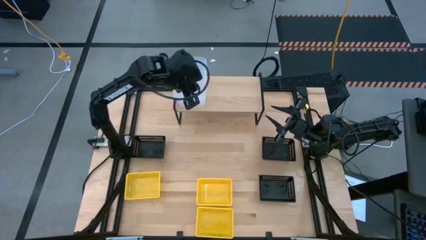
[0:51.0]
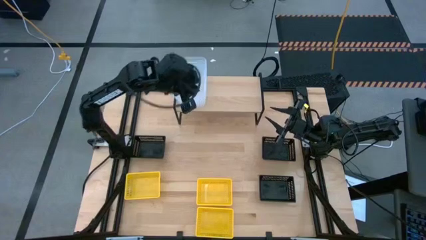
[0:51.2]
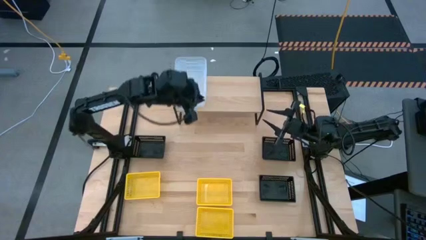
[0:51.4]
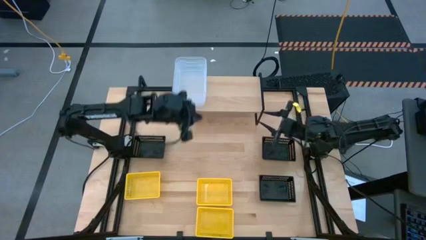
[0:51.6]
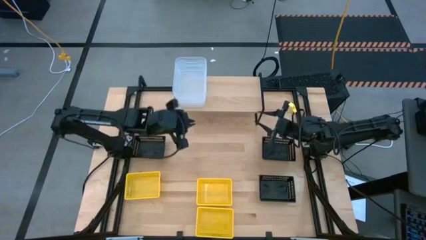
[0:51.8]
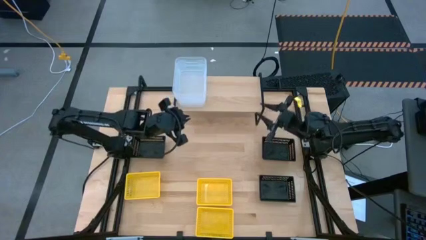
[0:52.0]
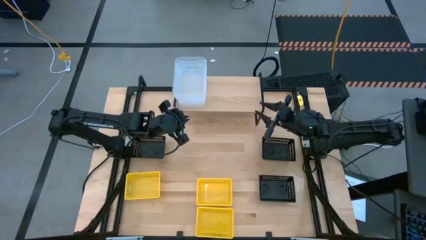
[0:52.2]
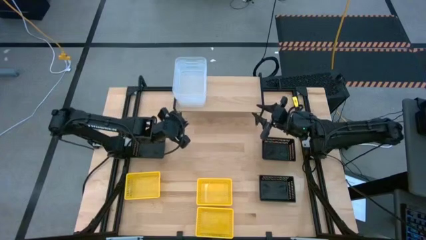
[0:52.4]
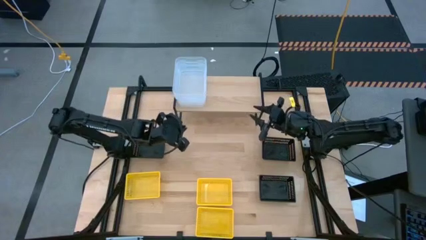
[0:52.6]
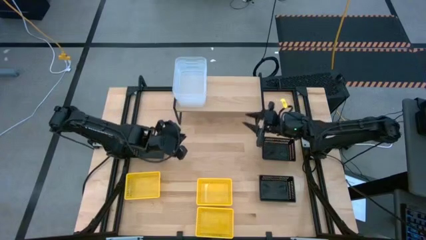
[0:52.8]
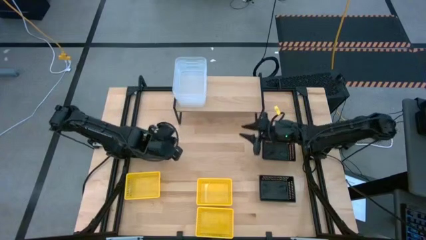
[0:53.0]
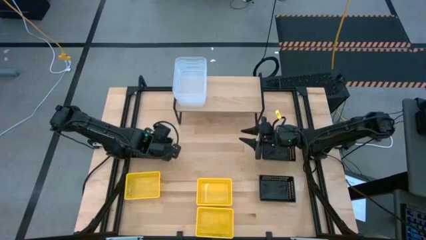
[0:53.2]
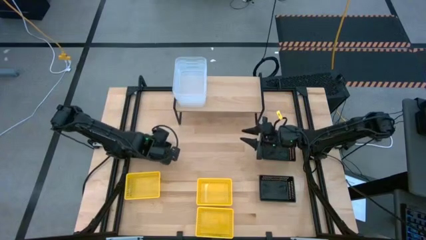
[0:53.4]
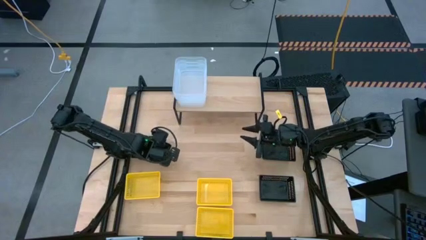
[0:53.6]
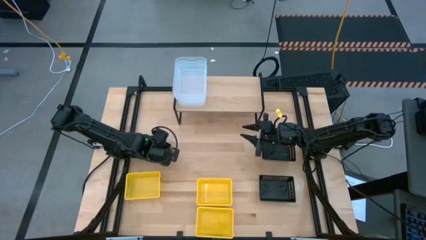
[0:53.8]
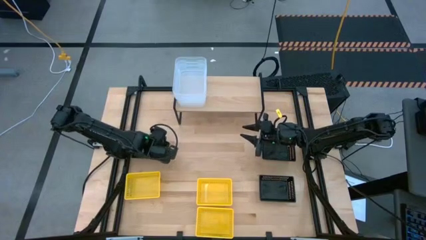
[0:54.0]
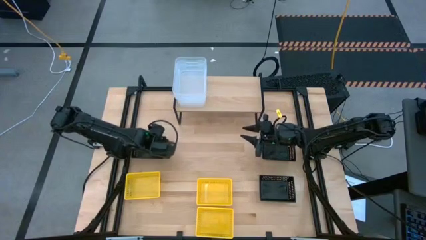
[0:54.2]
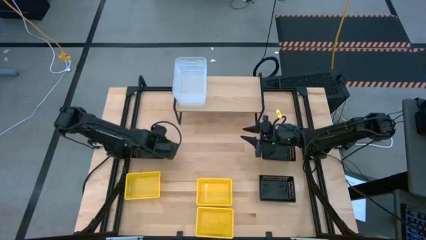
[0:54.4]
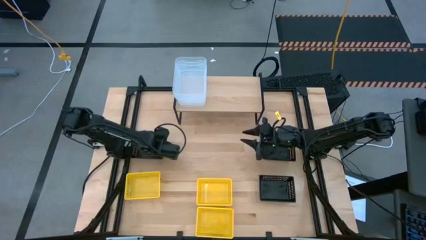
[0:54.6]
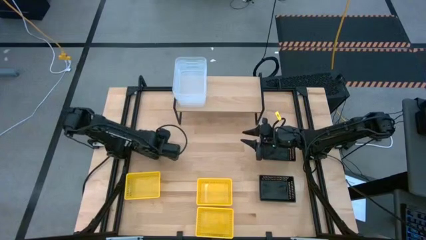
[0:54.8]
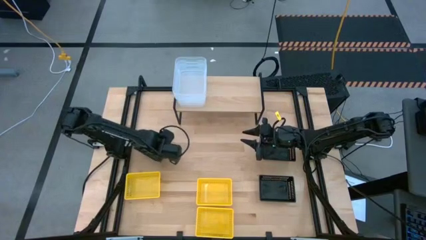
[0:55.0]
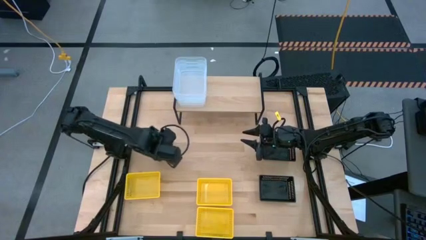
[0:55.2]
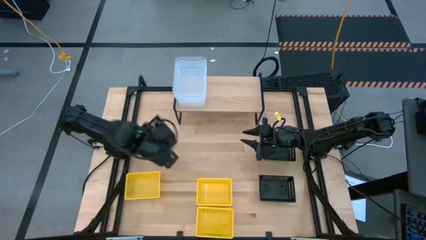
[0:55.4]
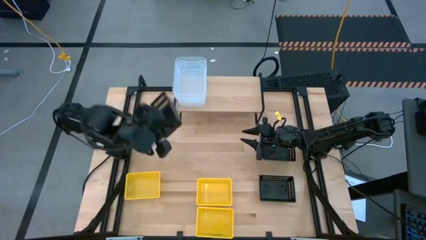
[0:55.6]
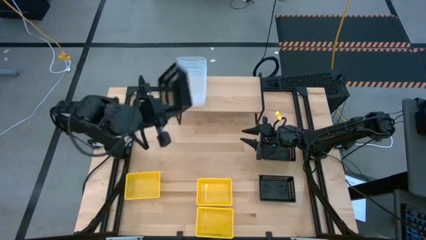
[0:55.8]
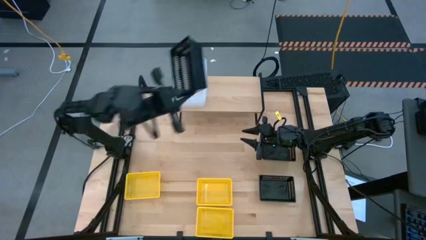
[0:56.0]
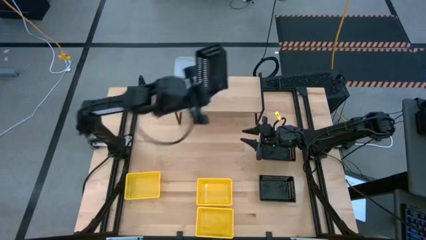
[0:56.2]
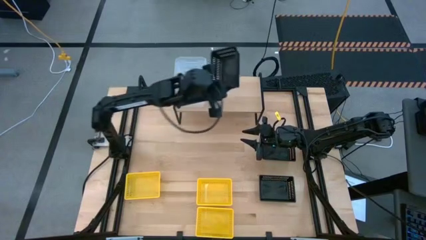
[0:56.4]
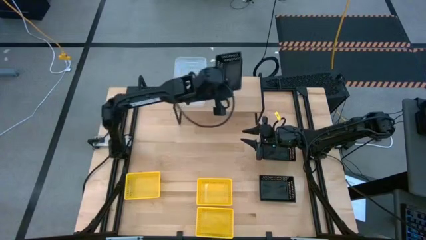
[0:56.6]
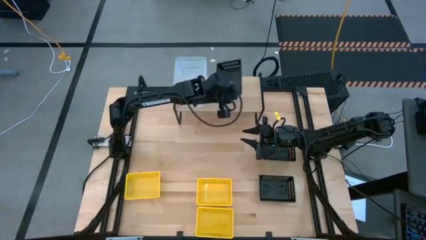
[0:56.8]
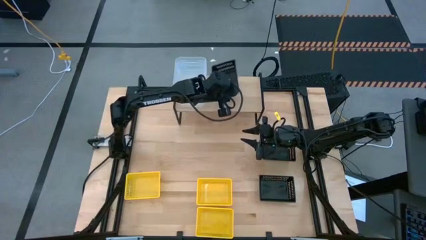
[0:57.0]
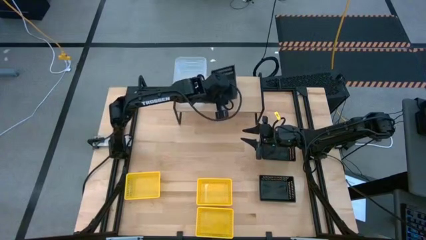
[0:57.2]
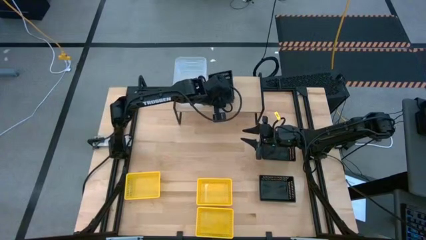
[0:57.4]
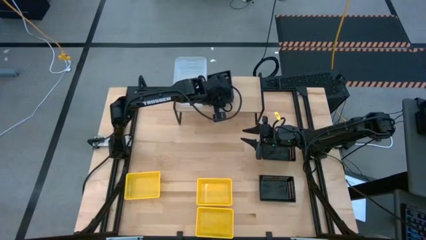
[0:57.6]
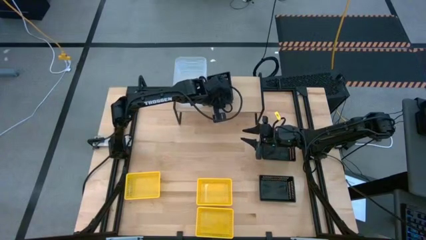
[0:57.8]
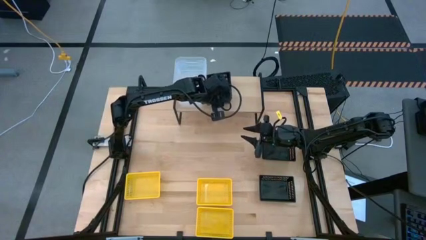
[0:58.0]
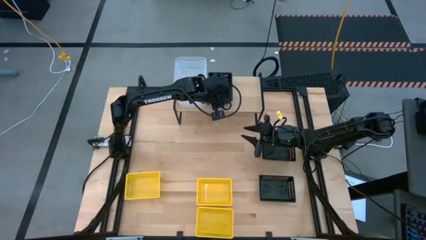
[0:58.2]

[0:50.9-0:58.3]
Task: Stack baskets on shelf by color
Put the left black bin on the shelf

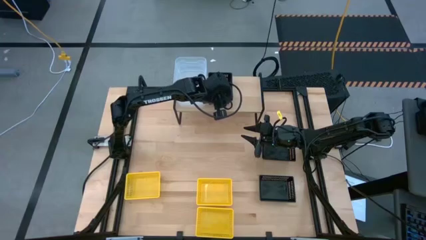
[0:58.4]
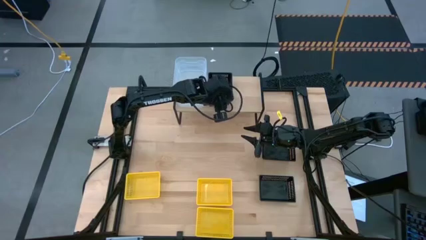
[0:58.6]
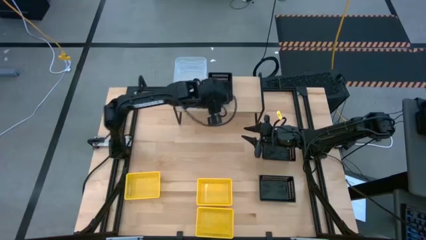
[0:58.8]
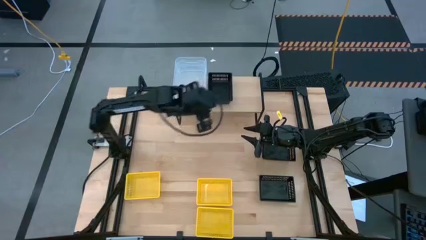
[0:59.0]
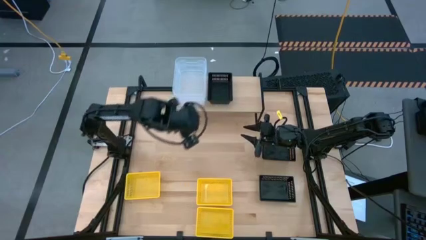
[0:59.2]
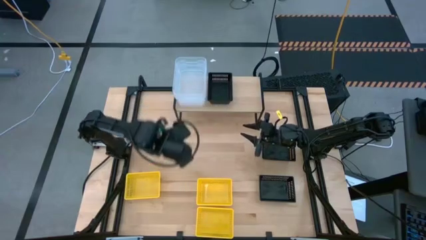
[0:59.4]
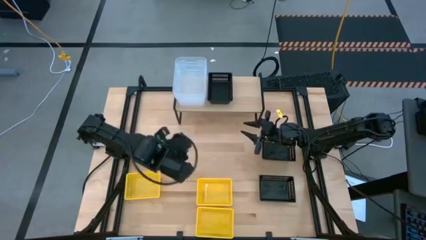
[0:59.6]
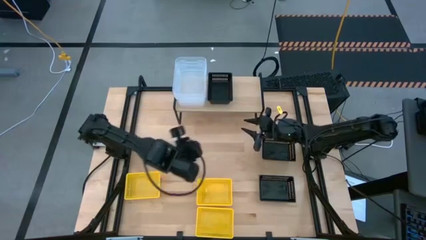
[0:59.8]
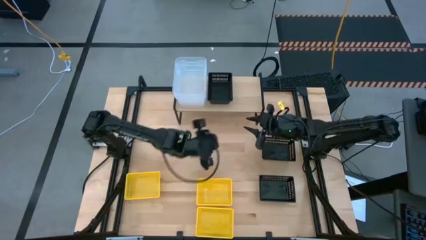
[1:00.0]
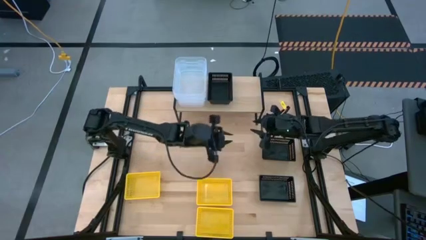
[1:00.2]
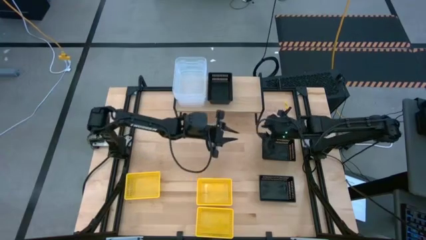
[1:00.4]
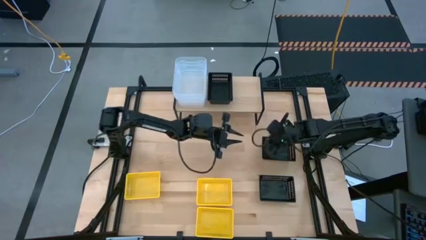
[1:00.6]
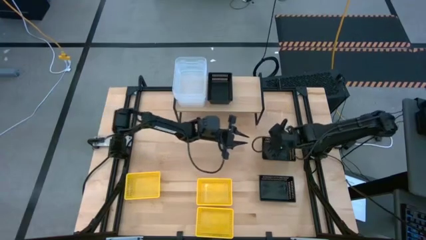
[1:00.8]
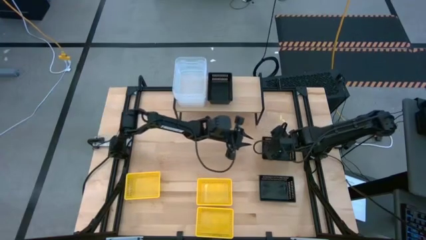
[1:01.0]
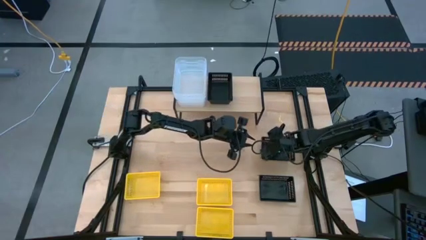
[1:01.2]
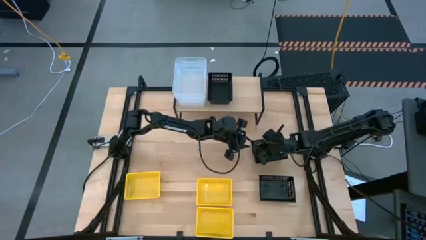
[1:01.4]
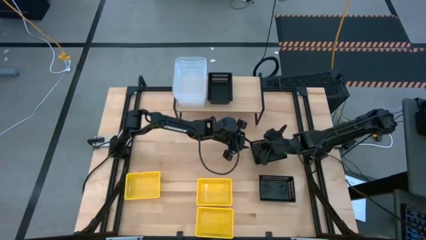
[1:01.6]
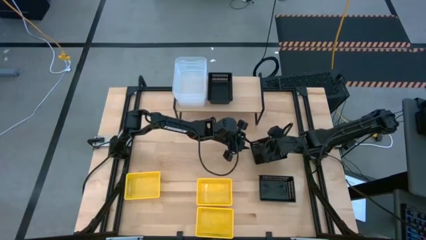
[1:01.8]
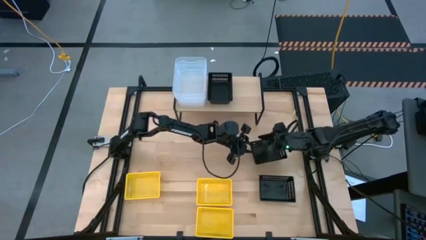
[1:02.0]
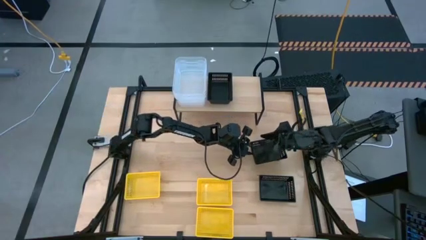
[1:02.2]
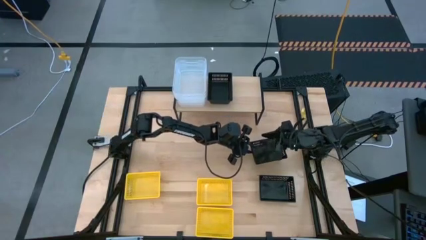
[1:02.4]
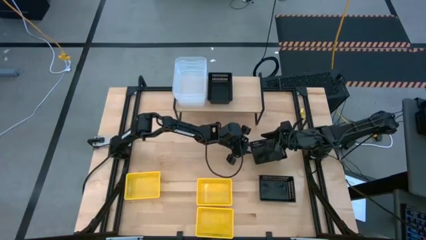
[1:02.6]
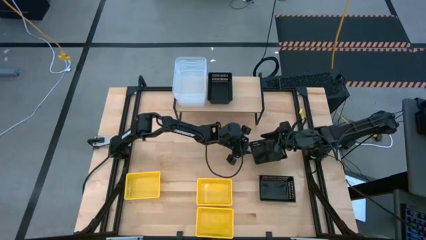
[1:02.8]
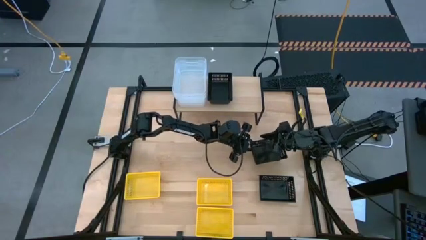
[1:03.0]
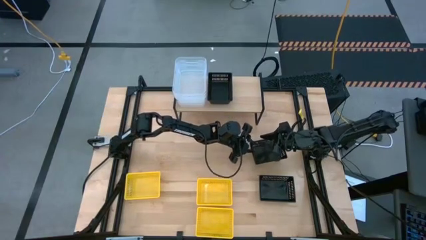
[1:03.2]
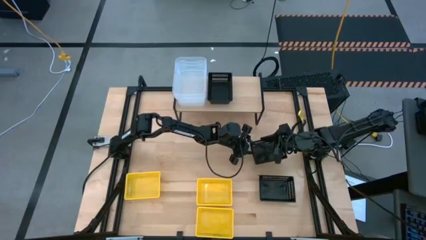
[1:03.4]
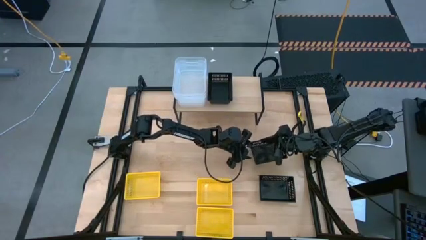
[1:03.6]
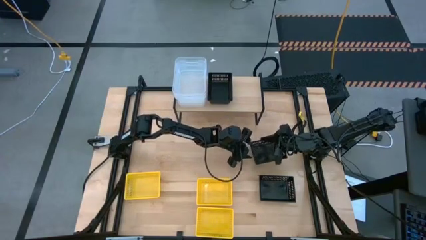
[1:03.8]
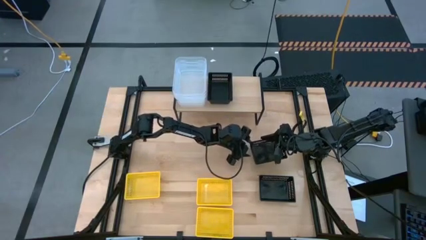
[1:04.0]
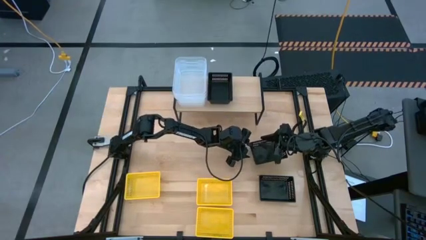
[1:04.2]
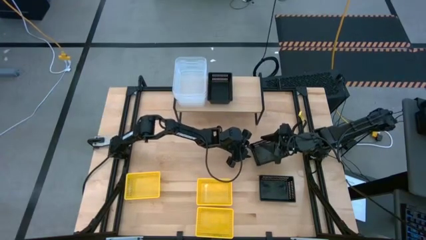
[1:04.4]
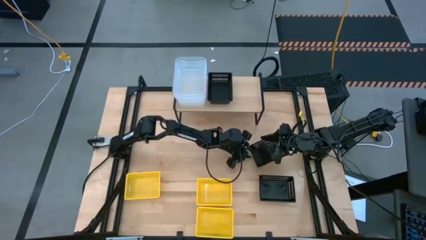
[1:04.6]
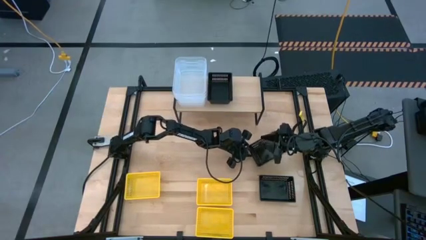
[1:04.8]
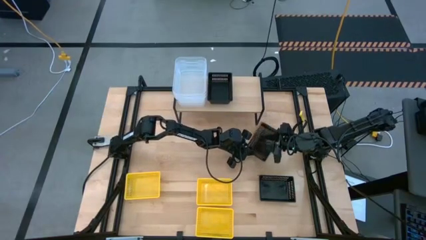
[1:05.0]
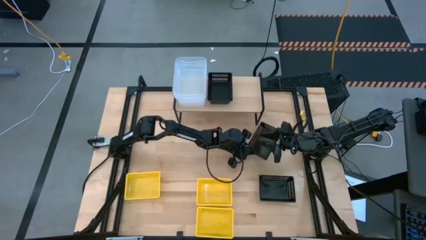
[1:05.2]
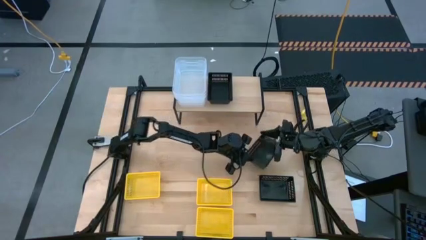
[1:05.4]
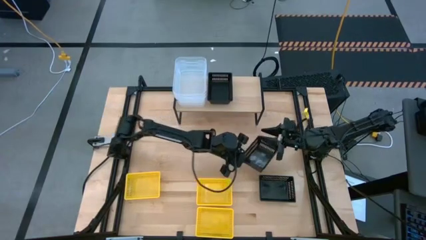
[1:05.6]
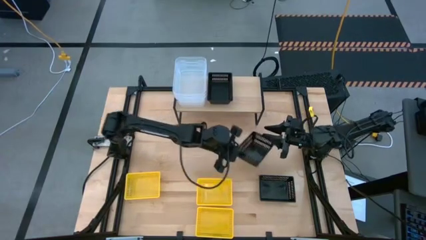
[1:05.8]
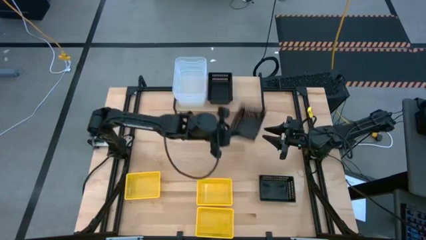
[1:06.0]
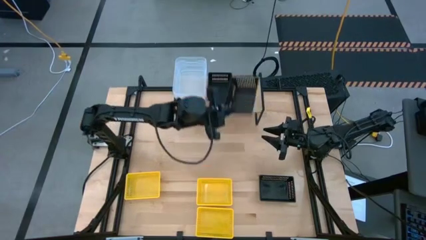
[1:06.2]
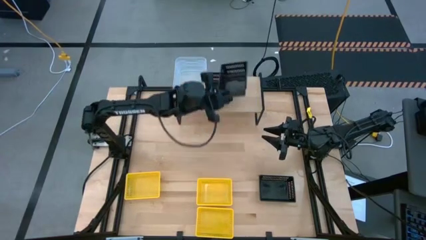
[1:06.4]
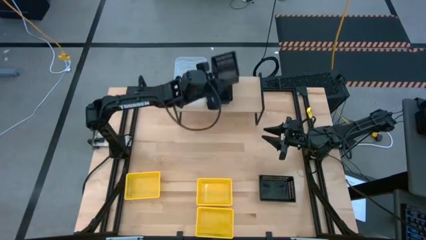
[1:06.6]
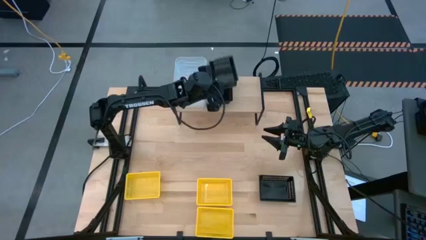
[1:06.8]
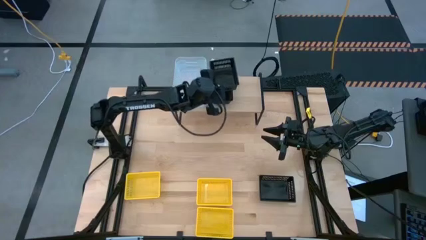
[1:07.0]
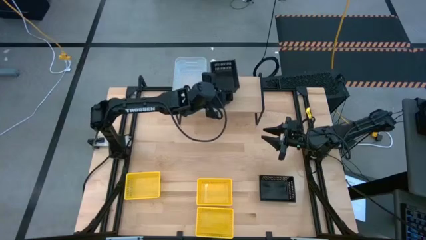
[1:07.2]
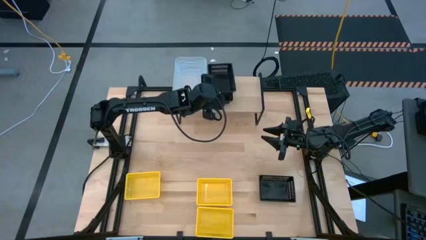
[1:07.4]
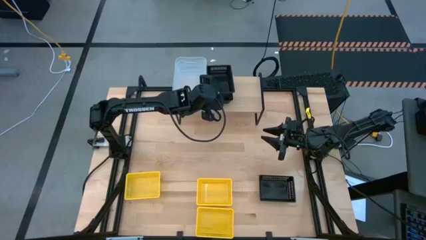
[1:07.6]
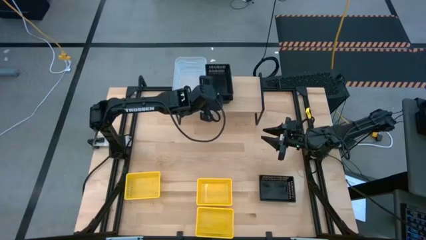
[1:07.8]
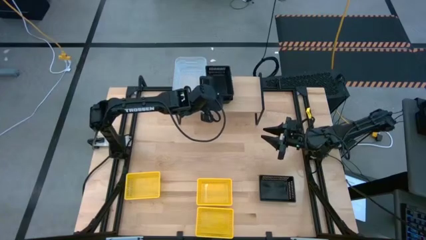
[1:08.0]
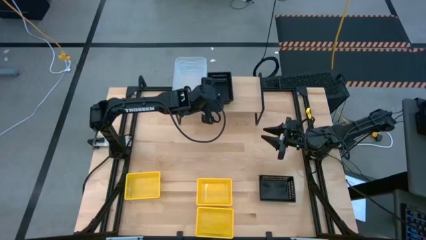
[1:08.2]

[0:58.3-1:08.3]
Stack the top black bin on top of the black bin on the shelf
